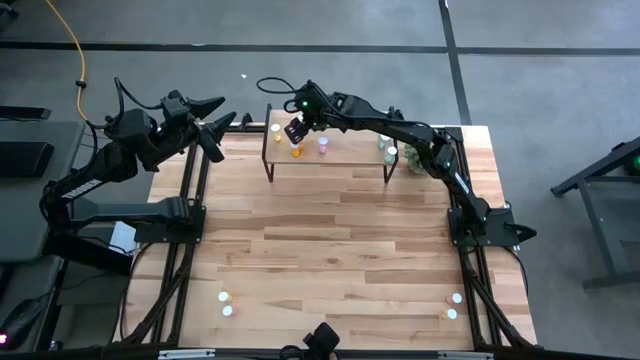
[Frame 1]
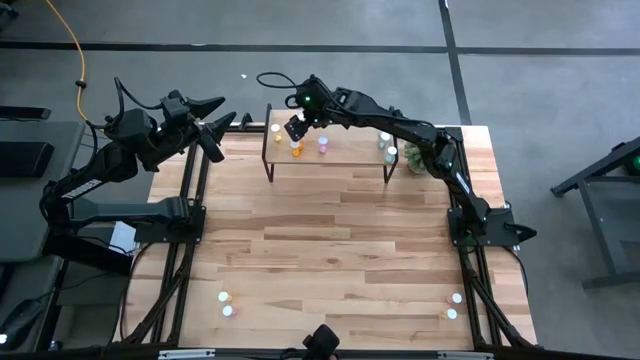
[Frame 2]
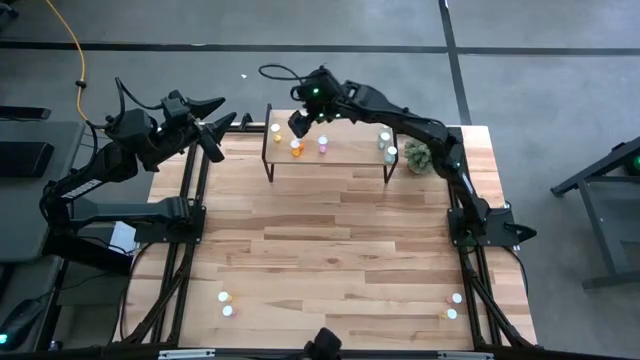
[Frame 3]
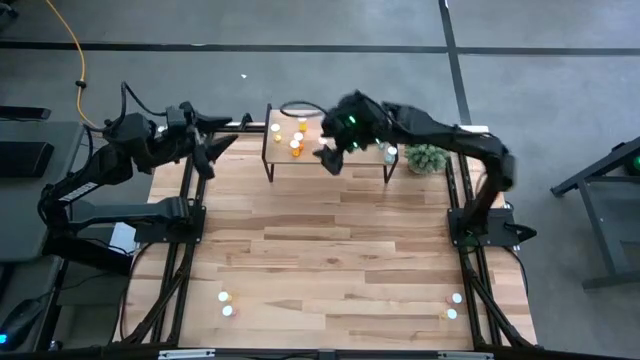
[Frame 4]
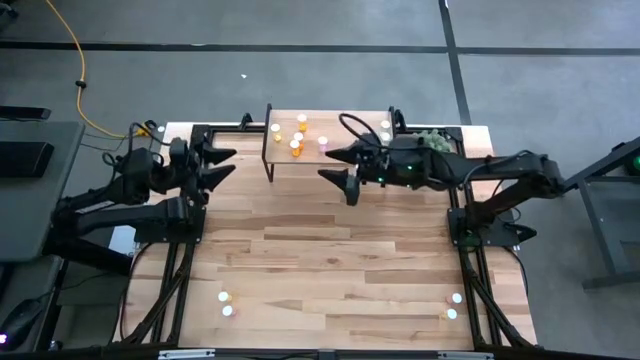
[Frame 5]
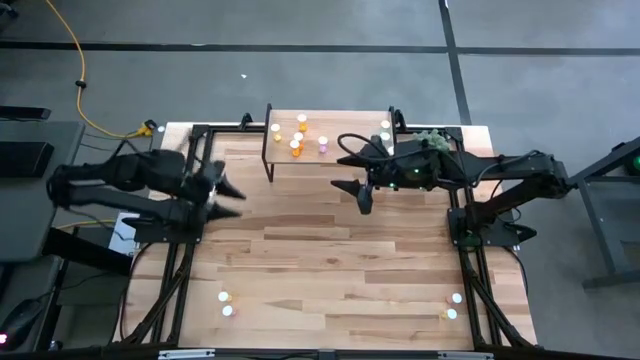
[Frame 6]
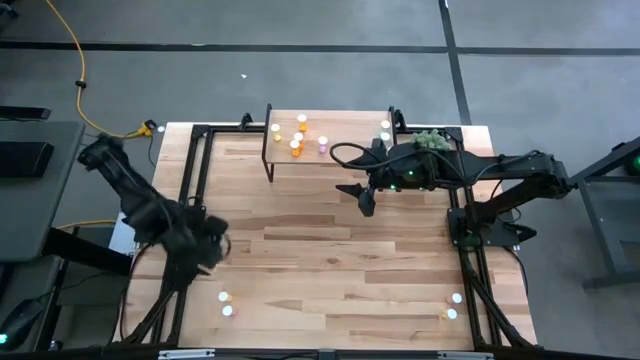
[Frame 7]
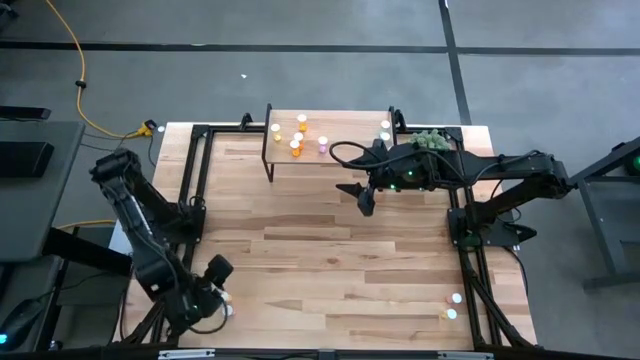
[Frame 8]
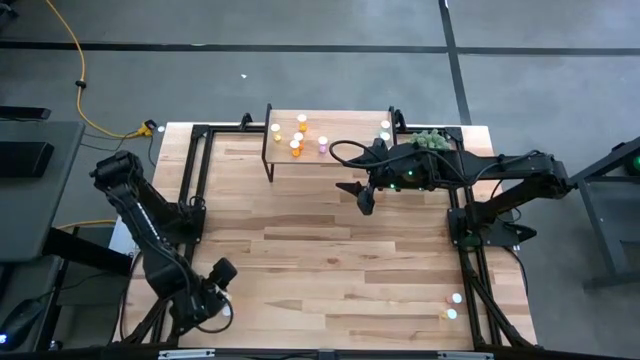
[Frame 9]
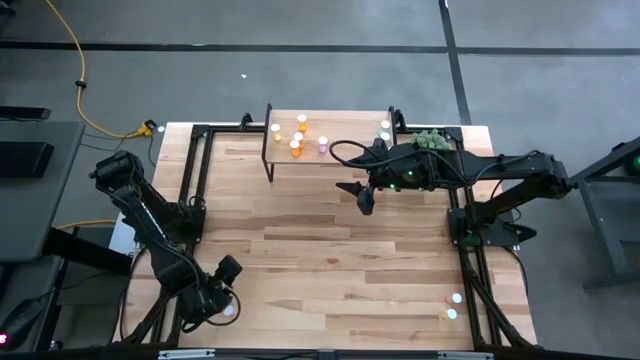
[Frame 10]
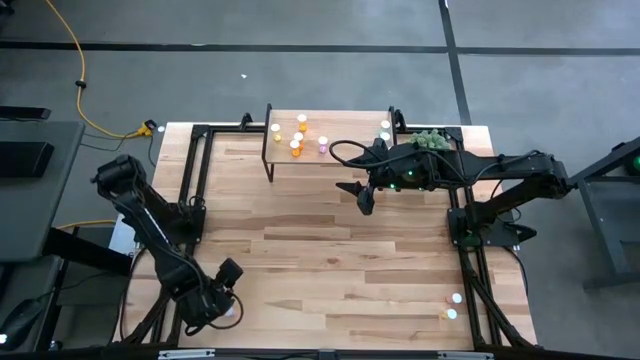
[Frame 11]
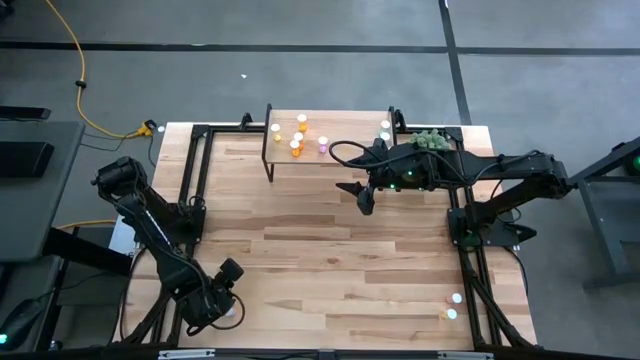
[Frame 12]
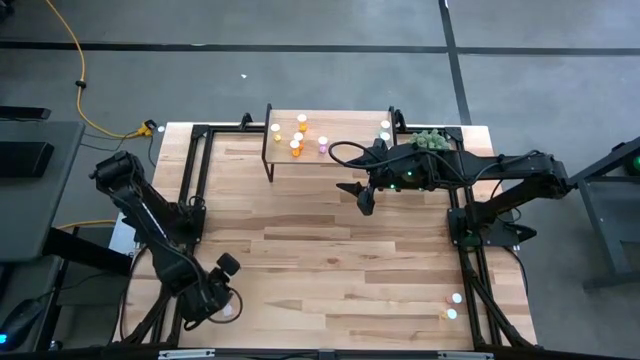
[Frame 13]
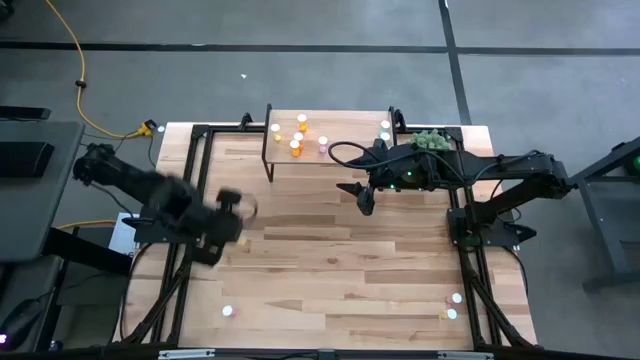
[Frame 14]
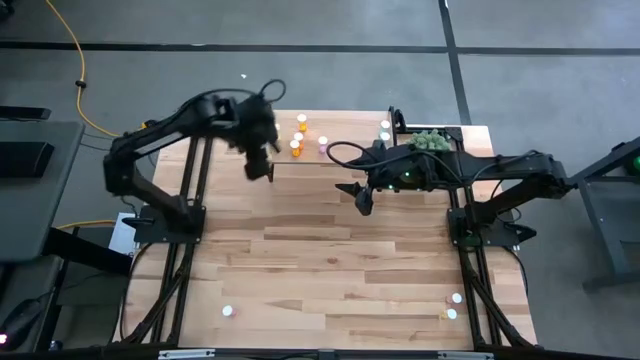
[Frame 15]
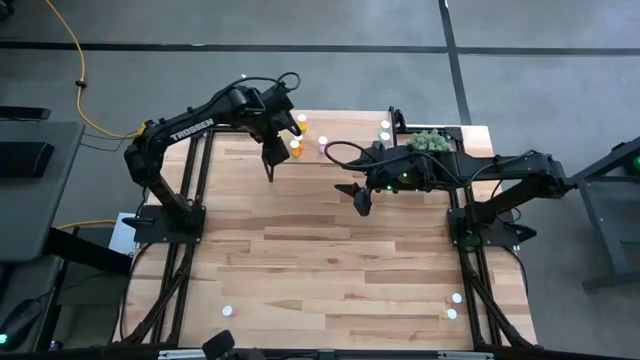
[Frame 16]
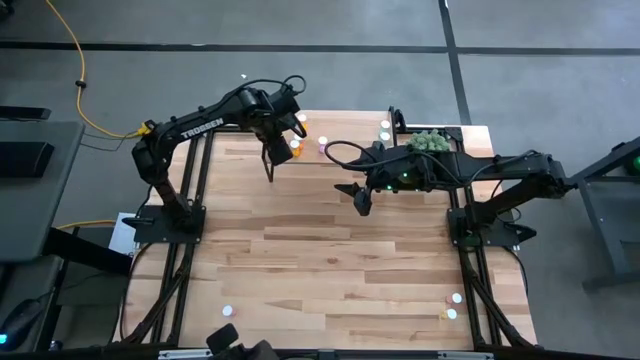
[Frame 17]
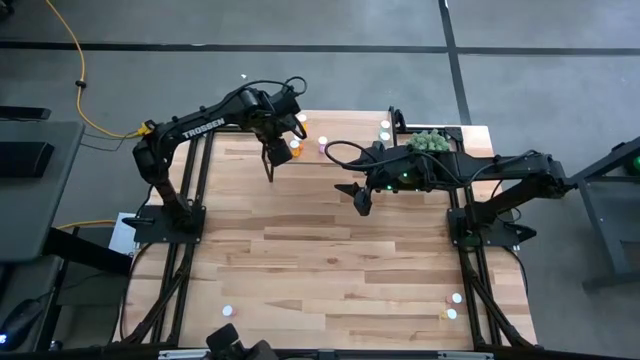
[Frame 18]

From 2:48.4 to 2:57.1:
Task: Pick and place medicine bottles onto shelf by color
Put the left yellow pill bottle on the shelf

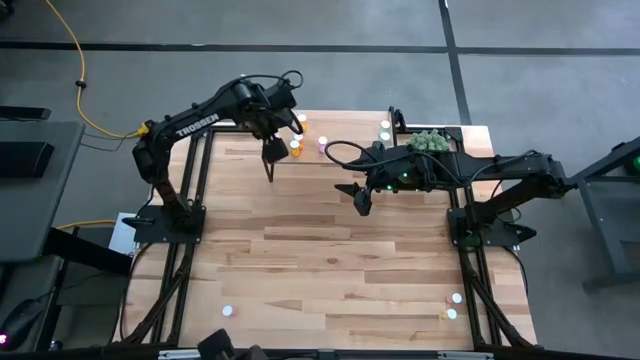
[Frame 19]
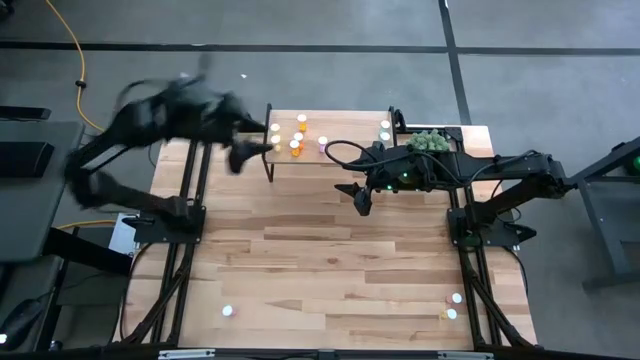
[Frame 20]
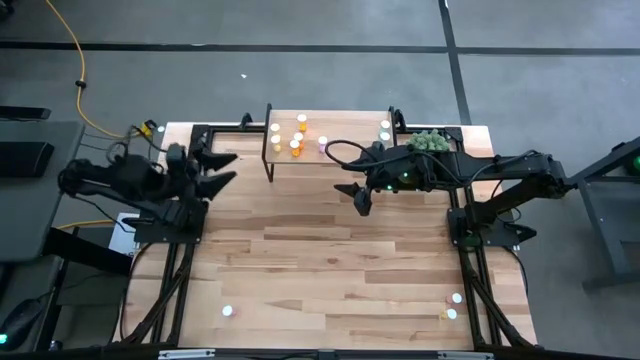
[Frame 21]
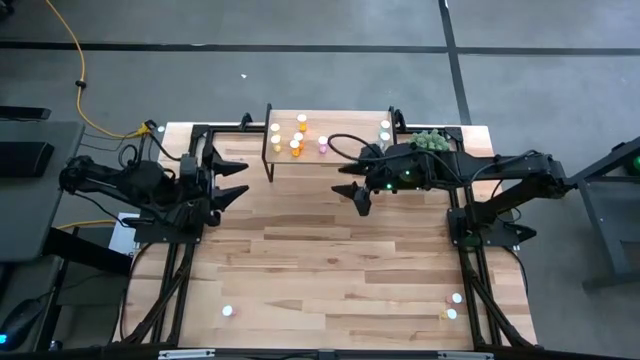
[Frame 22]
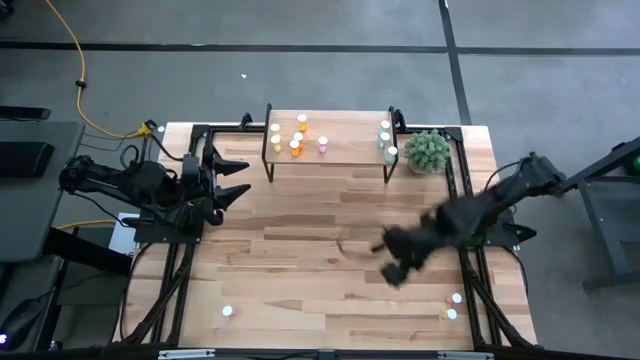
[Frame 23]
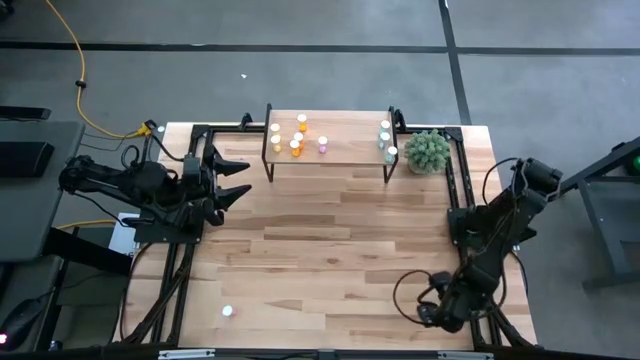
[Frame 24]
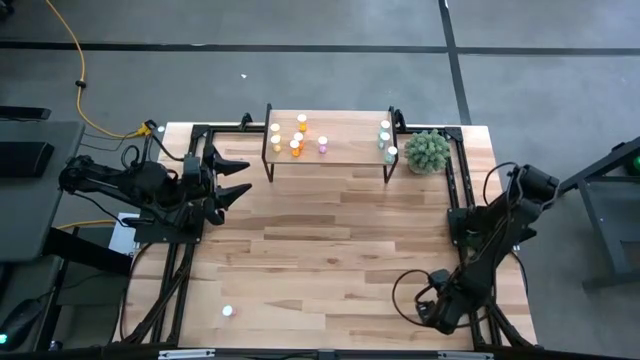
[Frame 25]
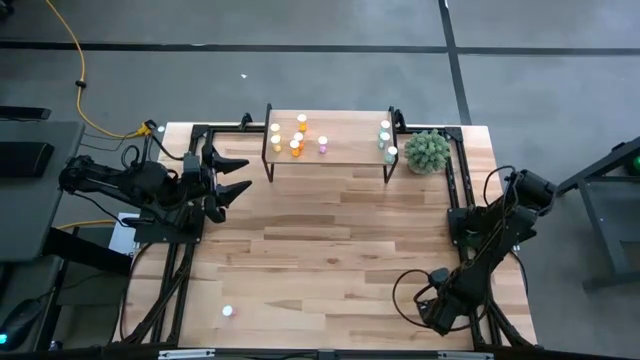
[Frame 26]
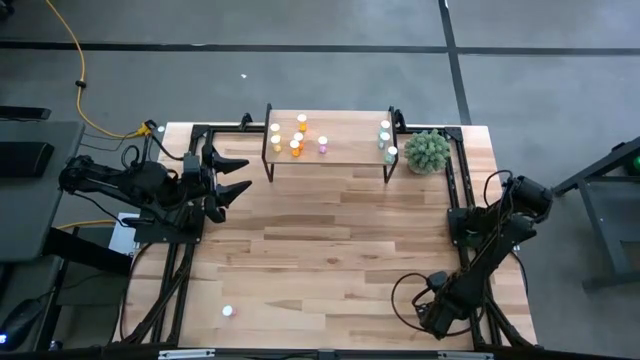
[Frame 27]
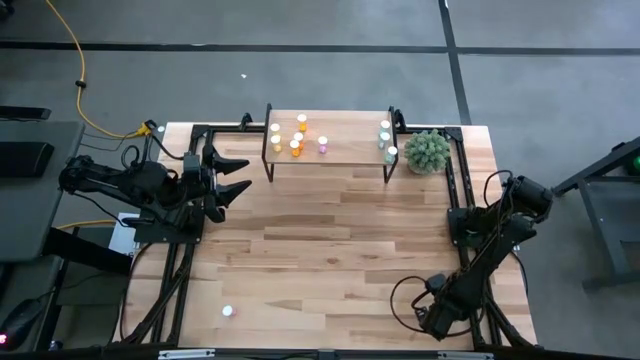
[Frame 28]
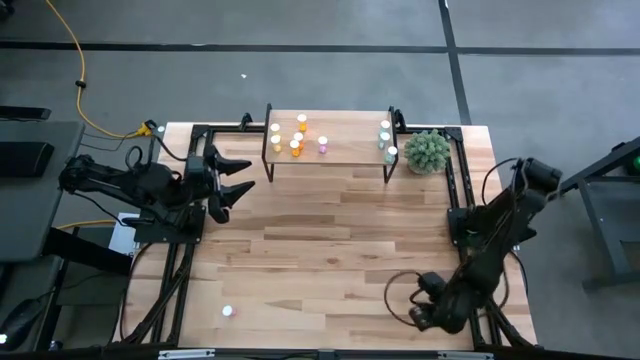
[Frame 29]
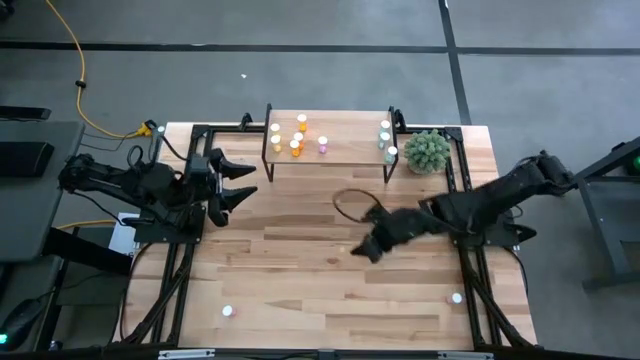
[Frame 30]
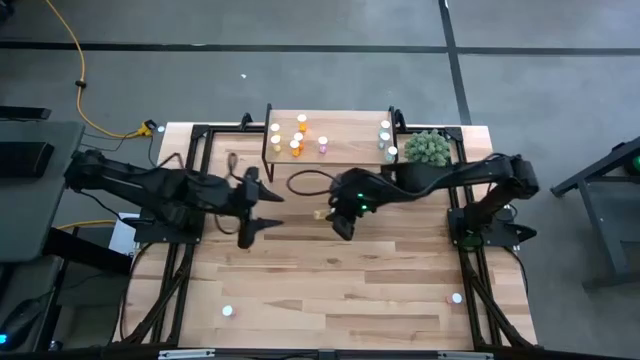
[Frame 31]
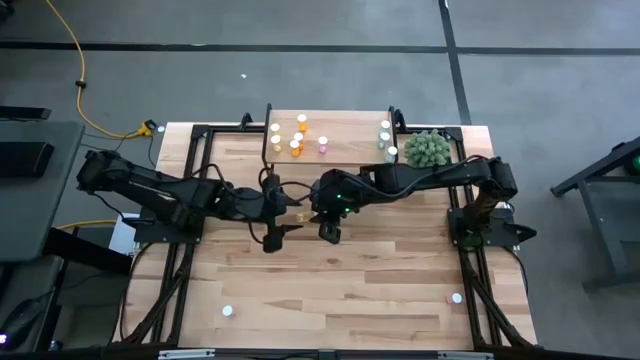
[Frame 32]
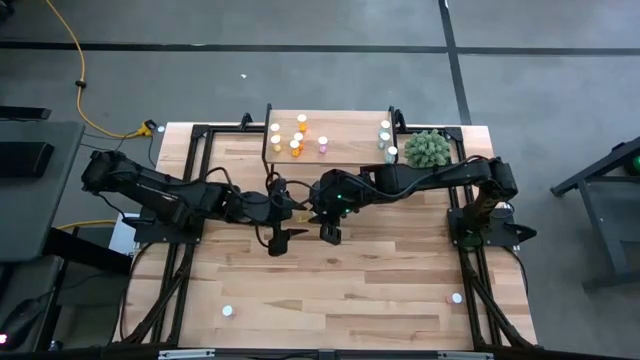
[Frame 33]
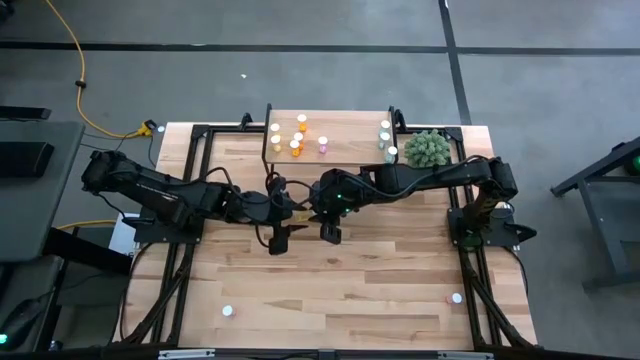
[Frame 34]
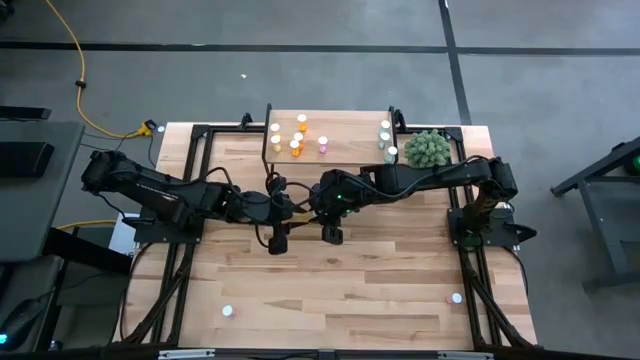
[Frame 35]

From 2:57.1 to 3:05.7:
Put the yellow pill bottle aligned with the other yellow pill bottles on the shelf

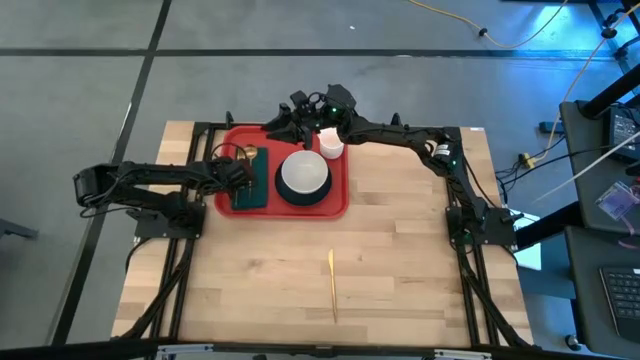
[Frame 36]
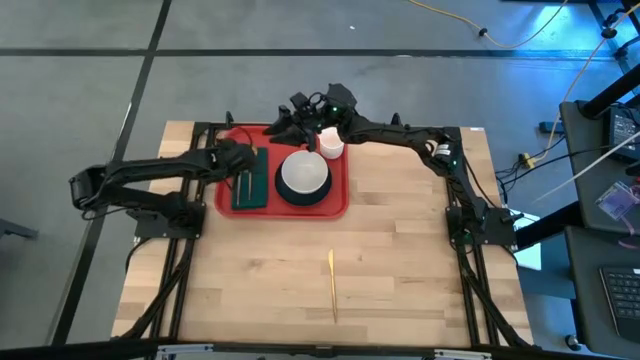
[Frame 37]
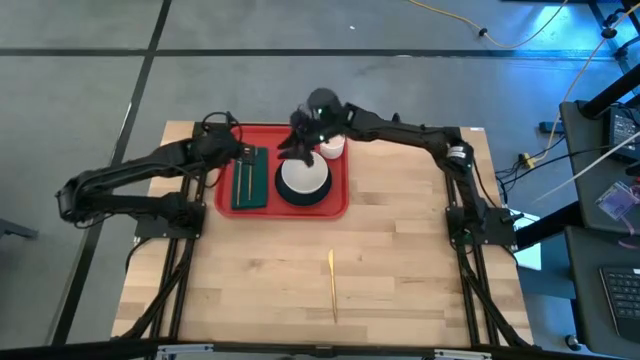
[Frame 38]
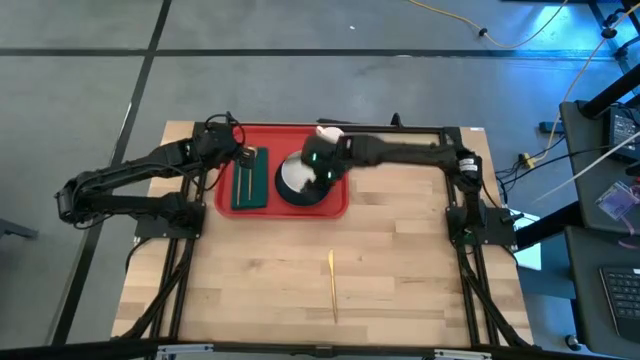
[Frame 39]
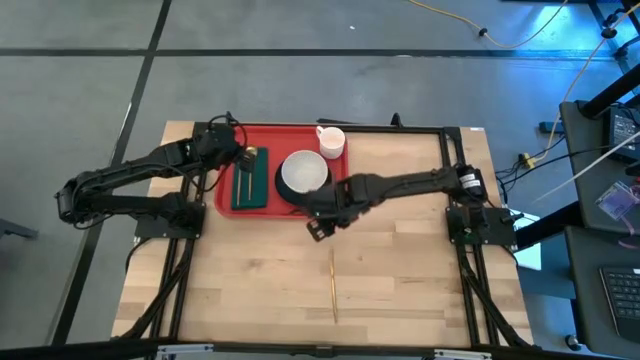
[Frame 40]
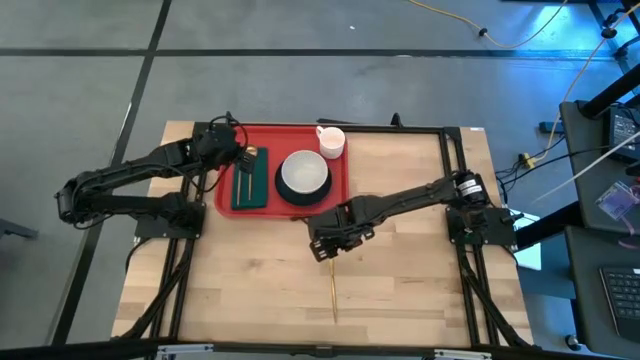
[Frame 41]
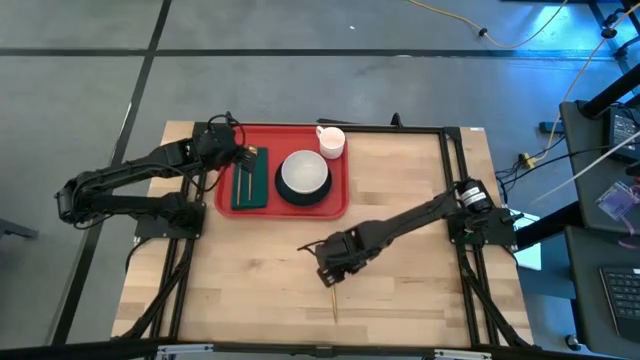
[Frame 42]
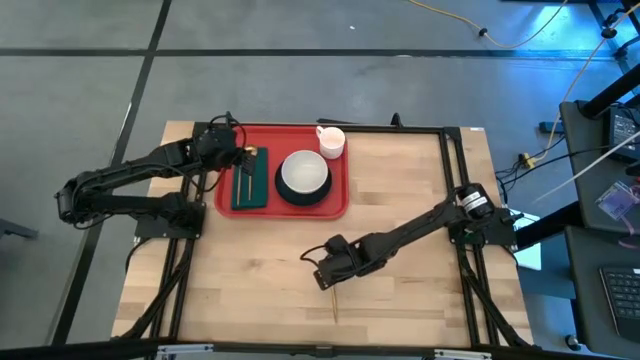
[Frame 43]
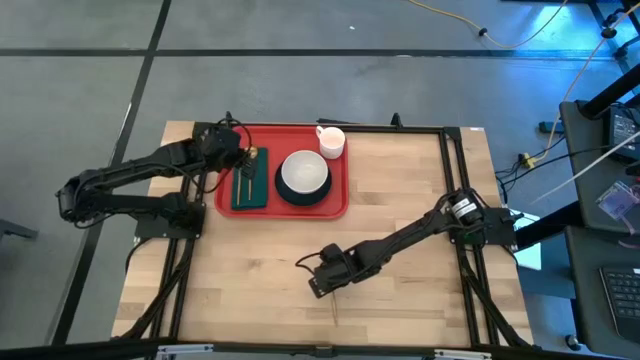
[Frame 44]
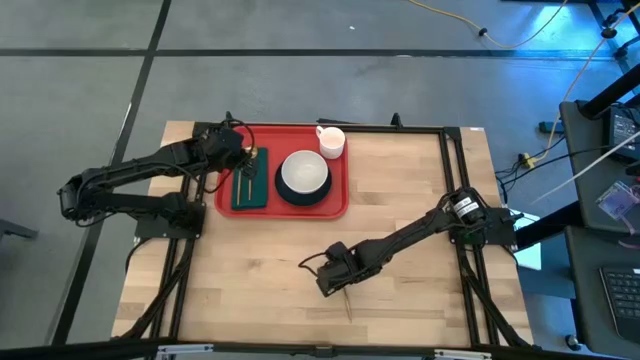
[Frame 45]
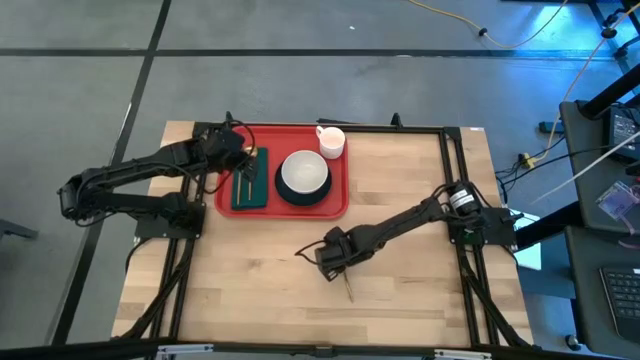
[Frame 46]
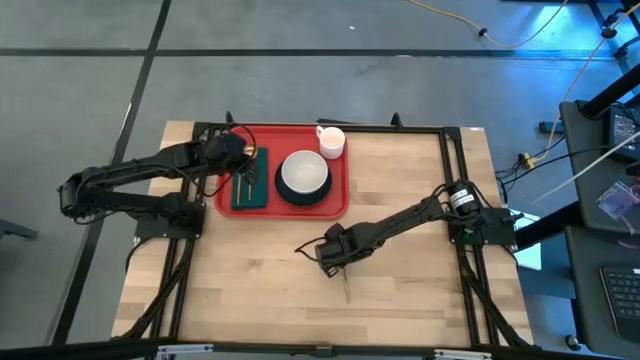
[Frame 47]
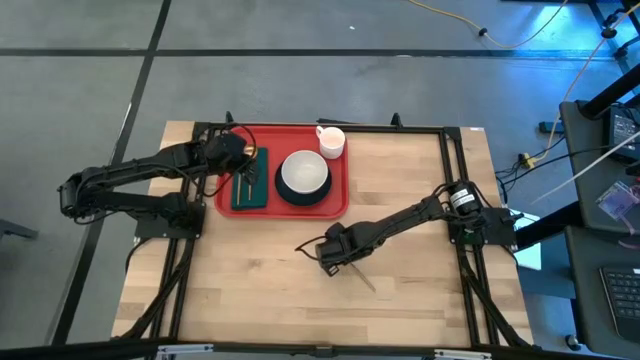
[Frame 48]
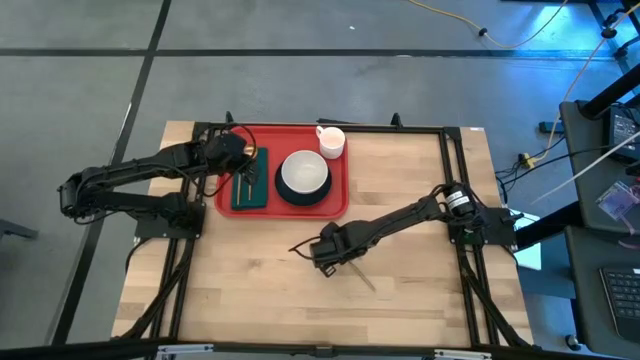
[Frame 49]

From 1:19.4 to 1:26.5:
Task: Set up tray
Put the gold knife on the green napkin to the right of the gold spoon
